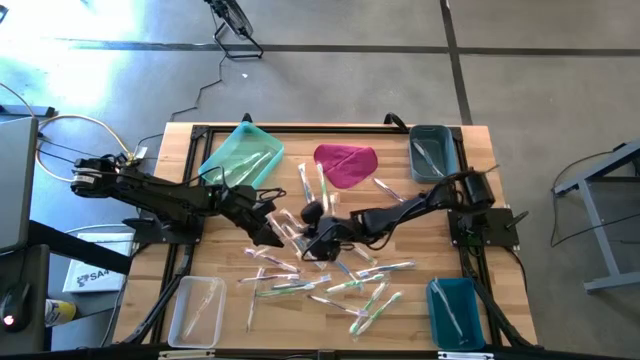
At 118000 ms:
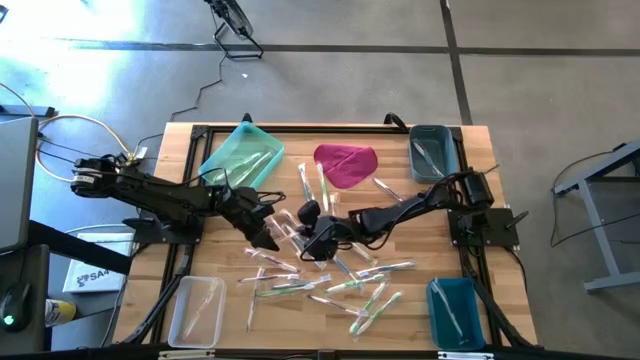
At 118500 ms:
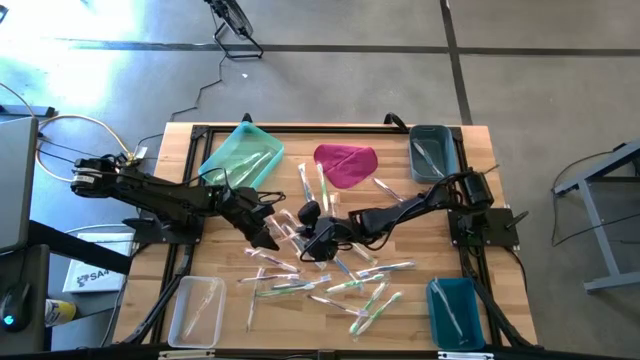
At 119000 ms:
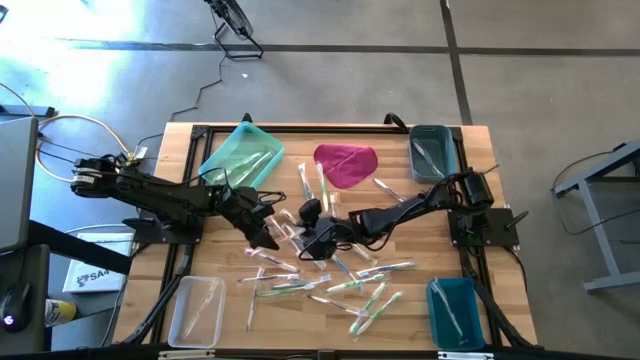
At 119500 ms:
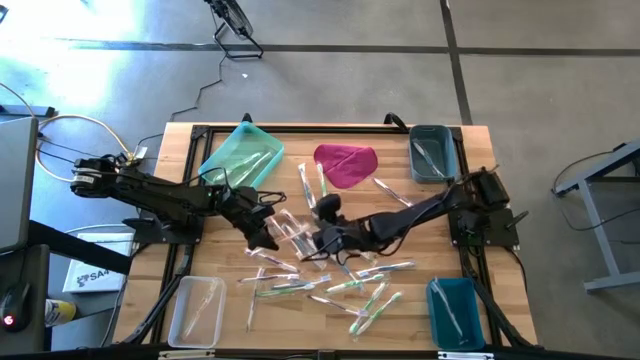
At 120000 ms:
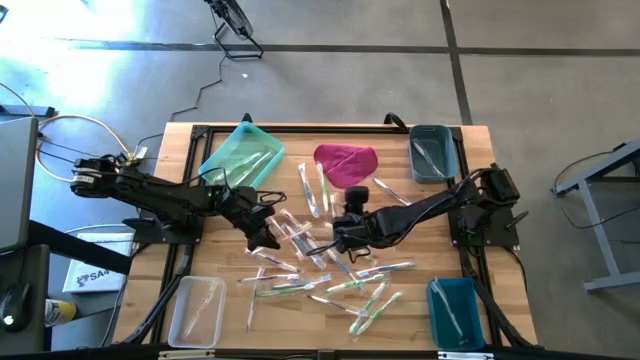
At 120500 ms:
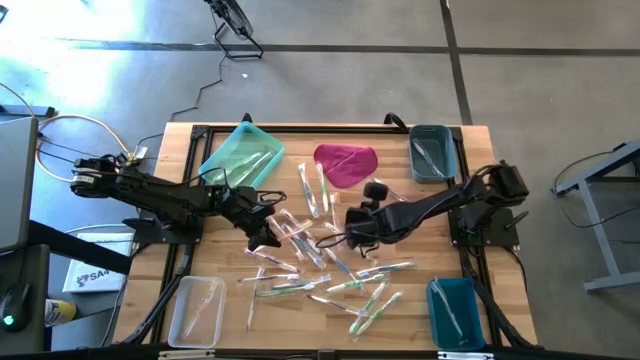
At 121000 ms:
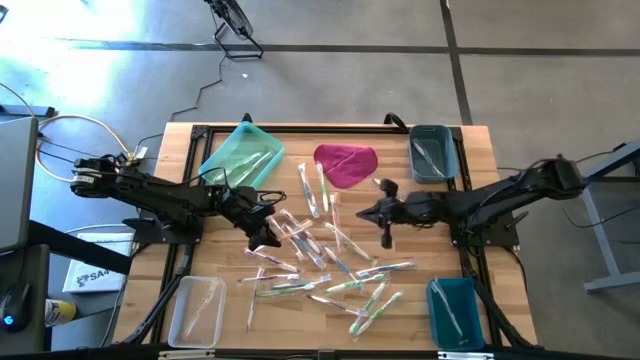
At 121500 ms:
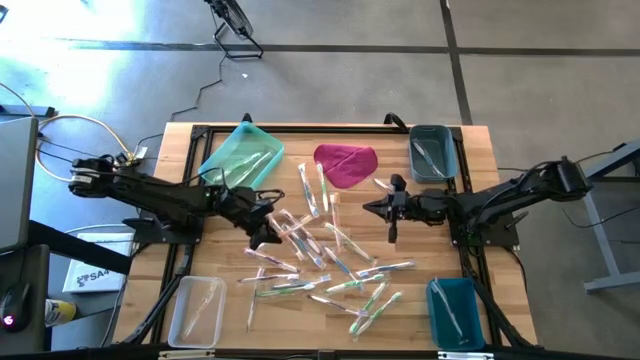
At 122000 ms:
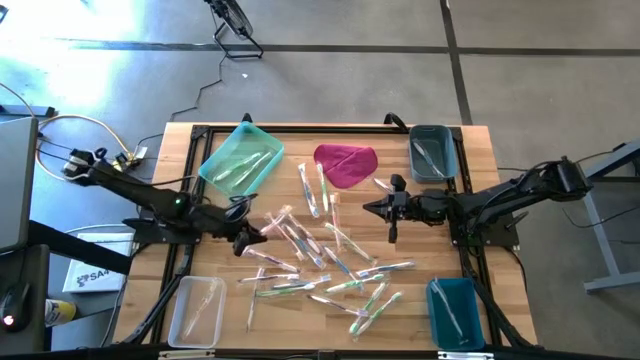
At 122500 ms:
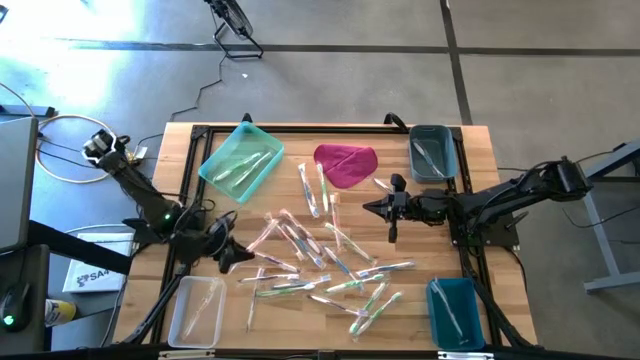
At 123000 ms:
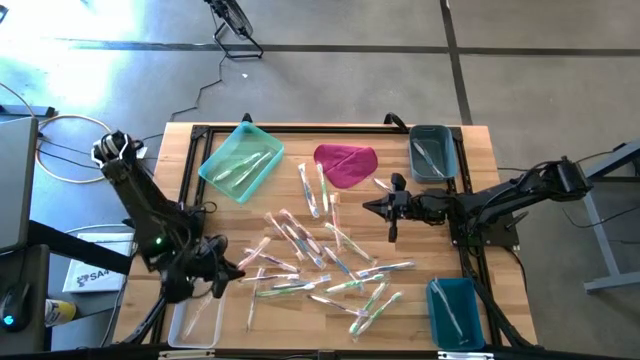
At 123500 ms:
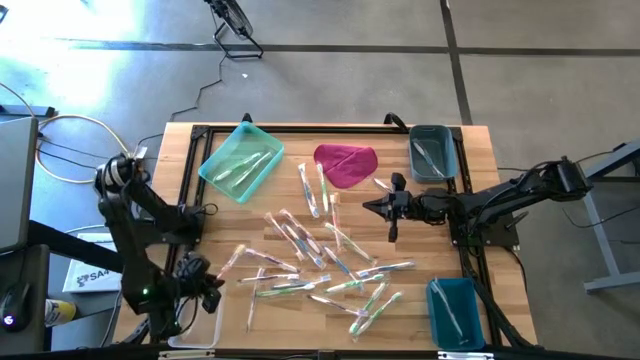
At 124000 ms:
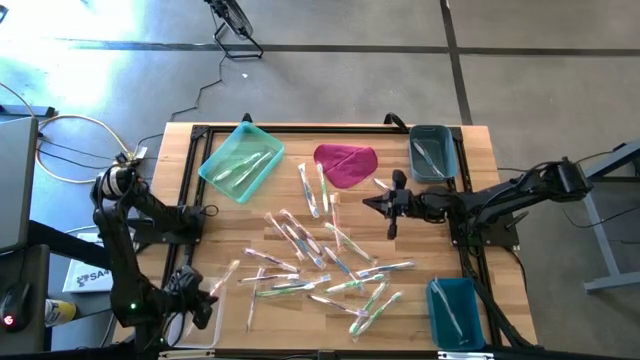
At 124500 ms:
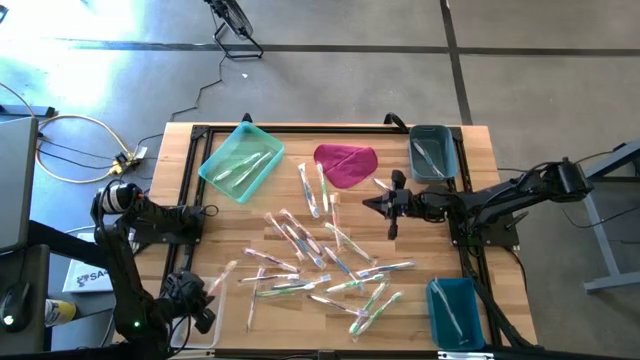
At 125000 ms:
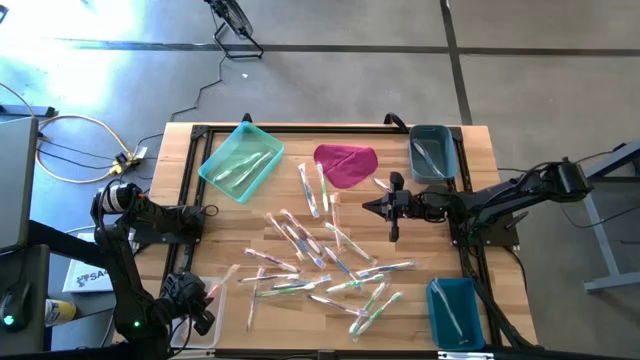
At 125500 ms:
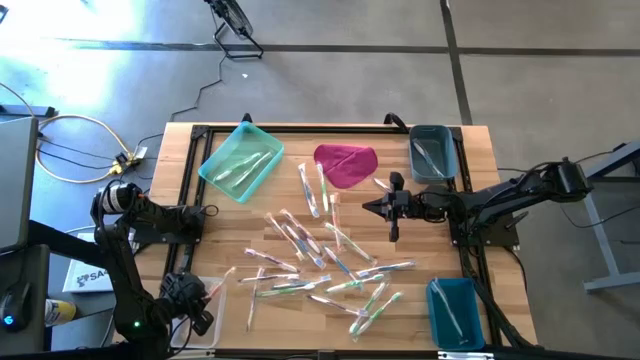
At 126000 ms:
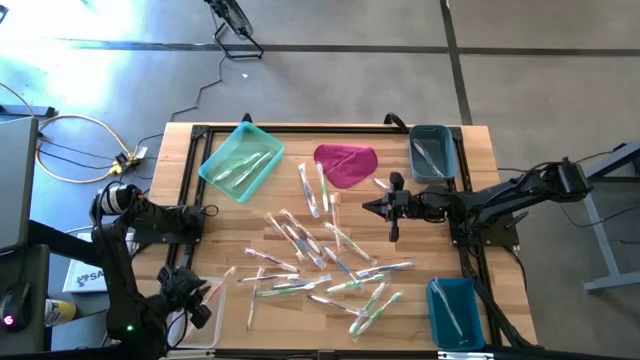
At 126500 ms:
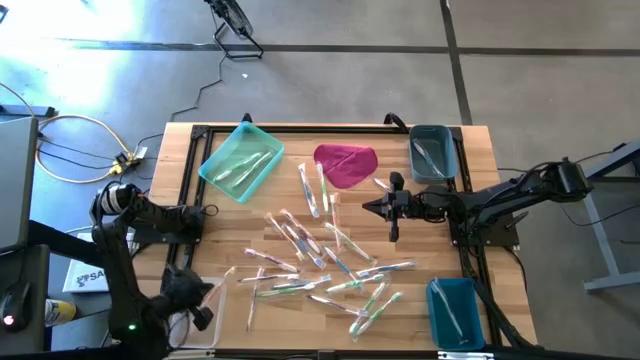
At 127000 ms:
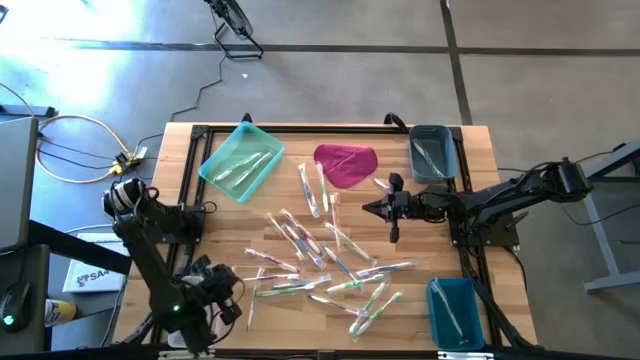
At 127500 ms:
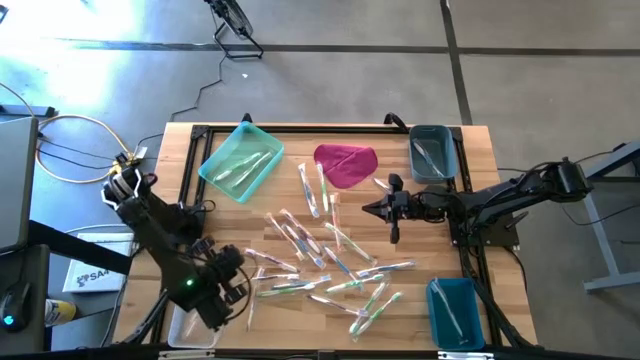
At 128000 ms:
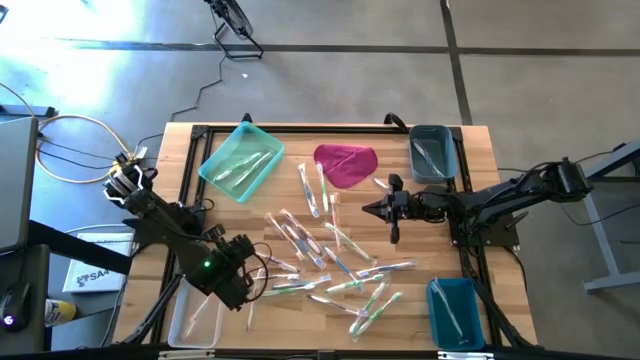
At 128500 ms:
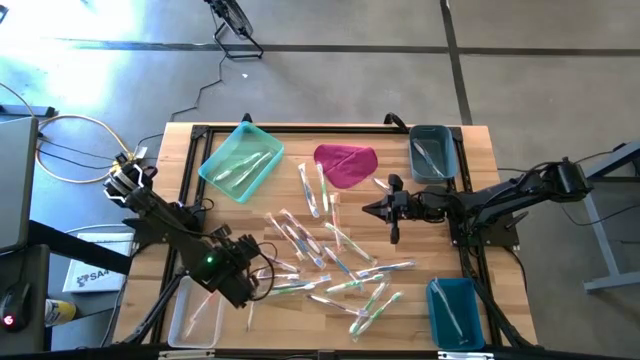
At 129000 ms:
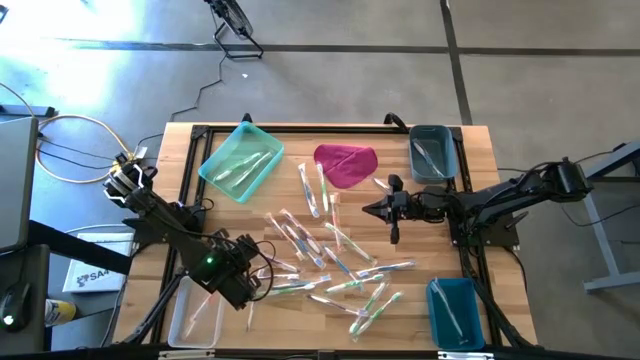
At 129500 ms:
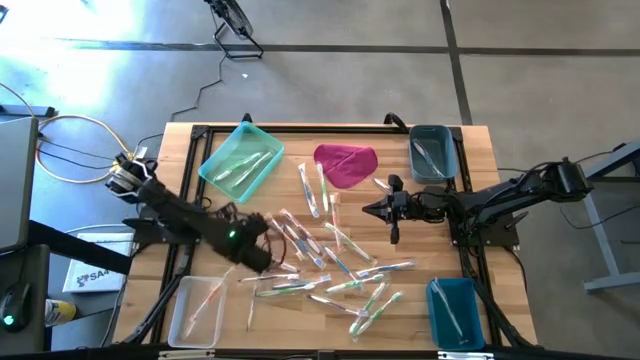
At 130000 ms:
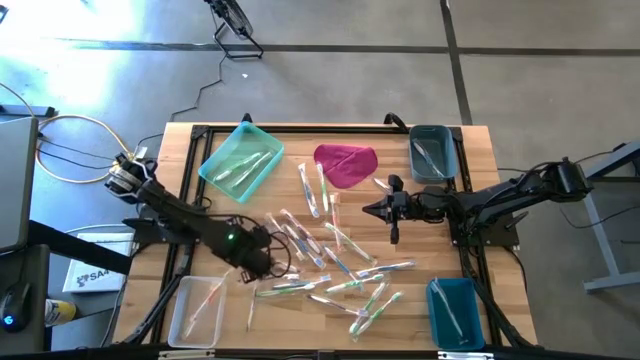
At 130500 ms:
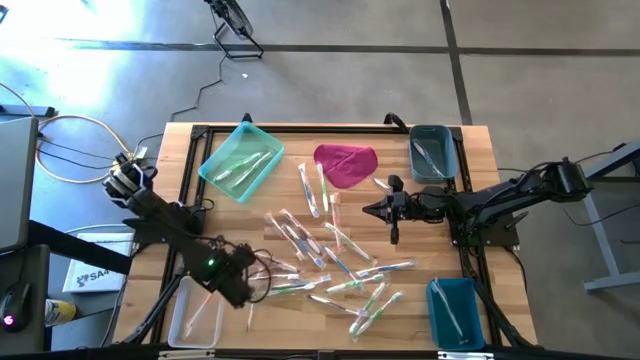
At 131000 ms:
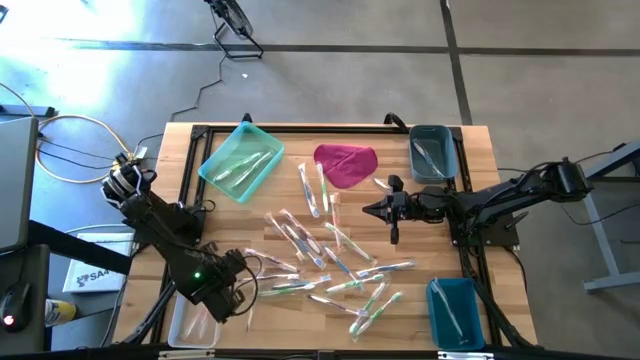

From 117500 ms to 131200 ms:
Task: Pick & Place Toothbrushes
Put the orange toothbrush to the transparent bin

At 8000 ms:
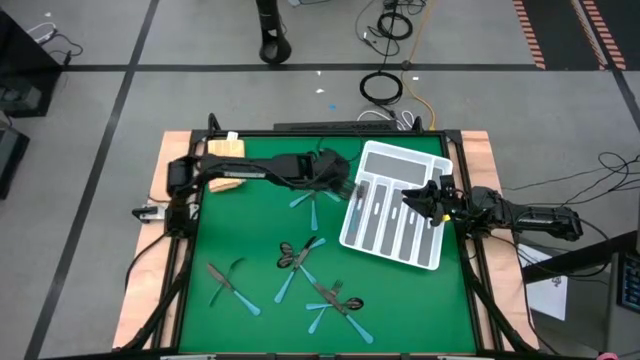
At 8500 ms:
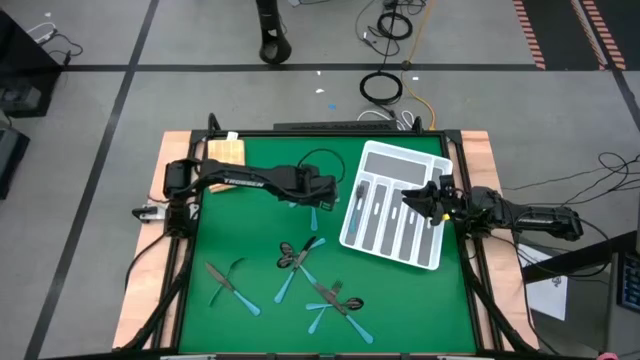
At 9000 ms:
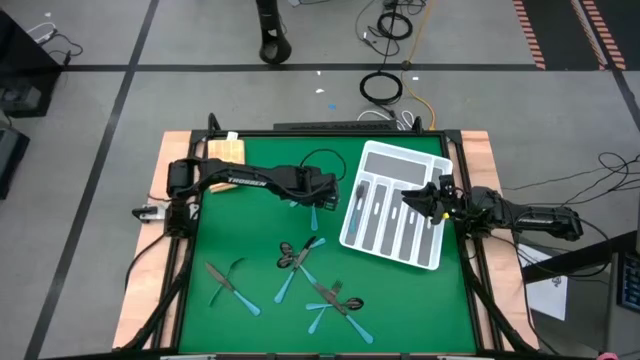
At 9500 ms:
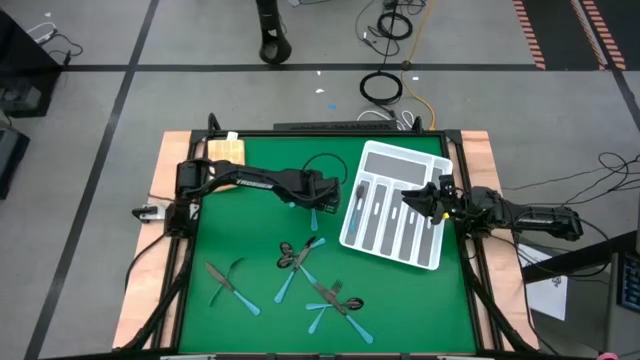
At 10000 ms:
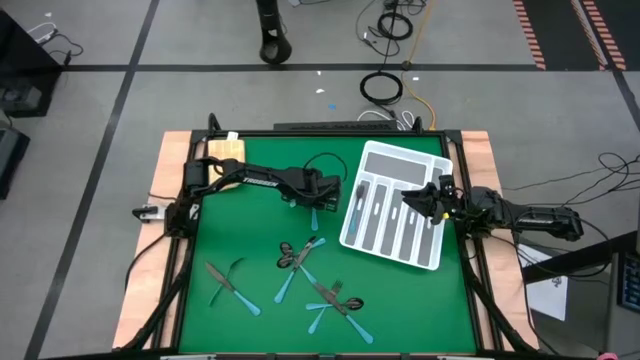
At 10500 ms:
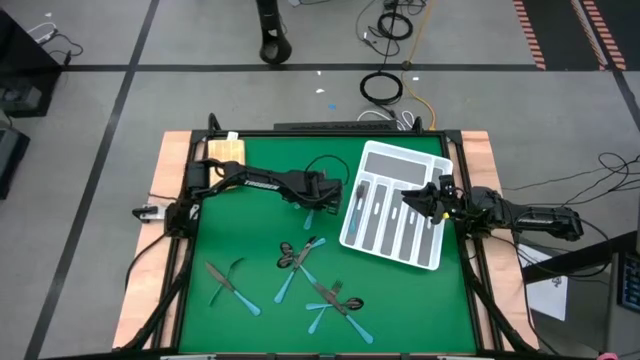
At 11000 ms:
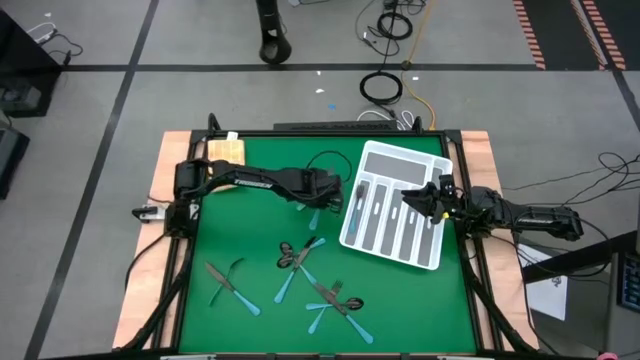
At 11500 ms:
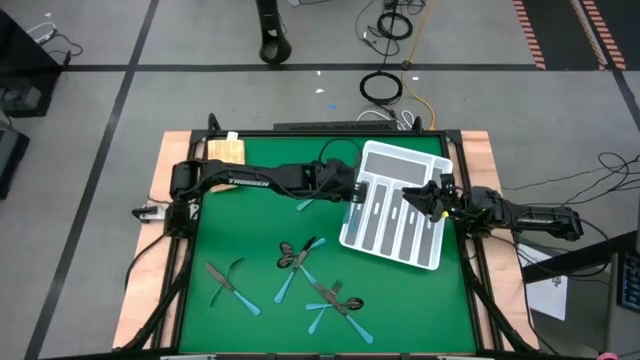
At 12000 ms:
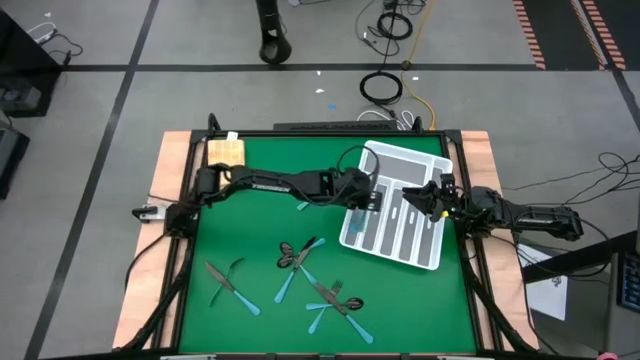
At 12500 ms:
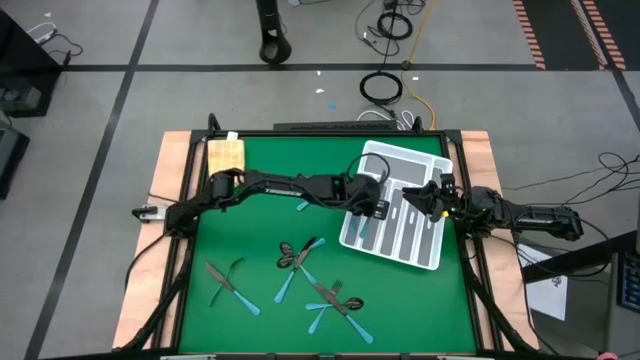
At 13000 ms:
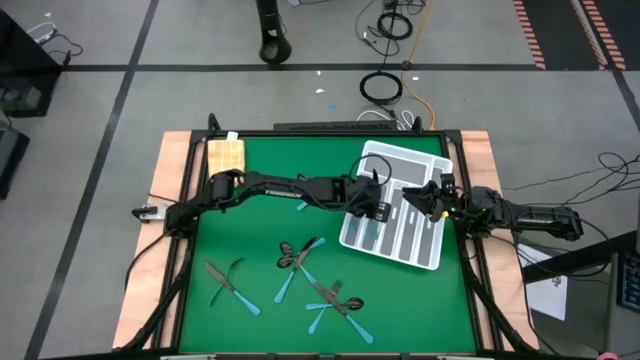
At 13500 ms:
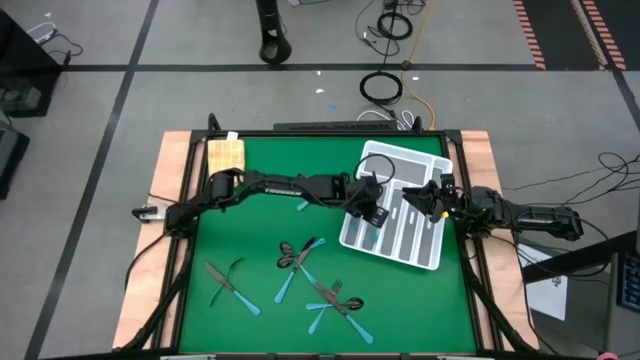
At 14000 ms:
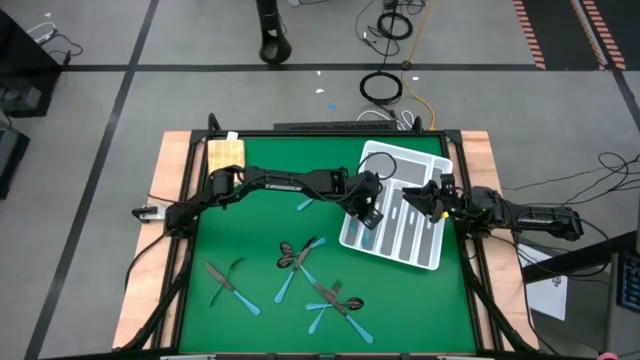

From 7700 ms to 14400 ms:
Task: Sort silverware
Put the blue table knife into the white cutlery tray
